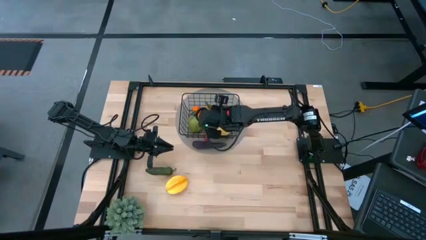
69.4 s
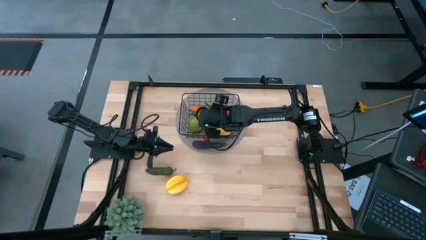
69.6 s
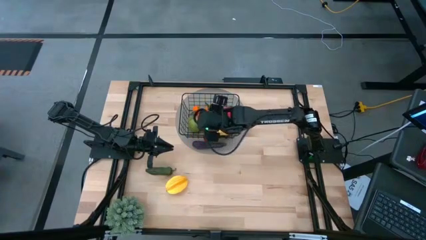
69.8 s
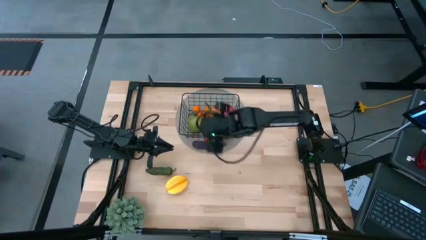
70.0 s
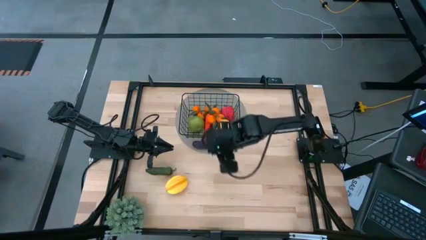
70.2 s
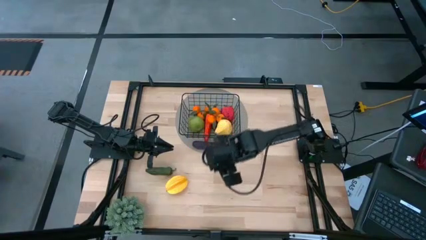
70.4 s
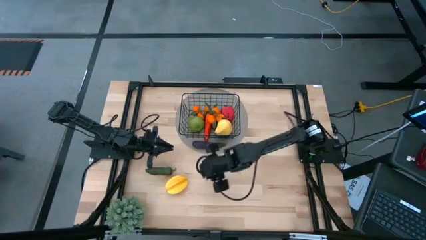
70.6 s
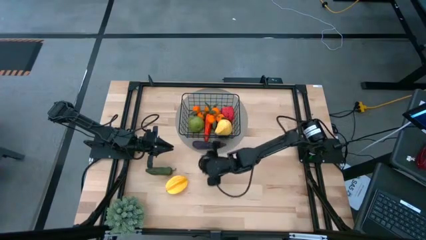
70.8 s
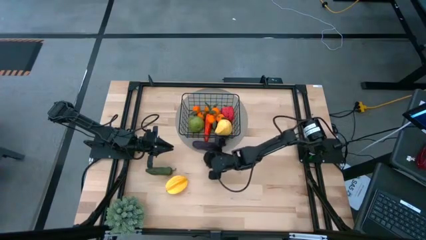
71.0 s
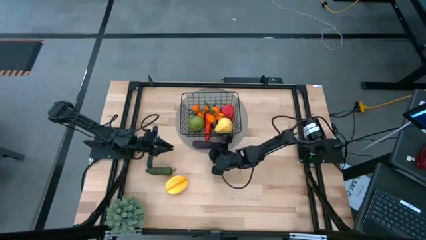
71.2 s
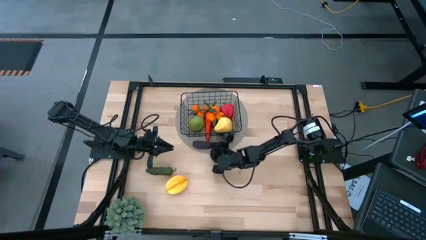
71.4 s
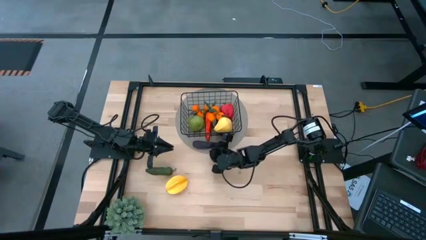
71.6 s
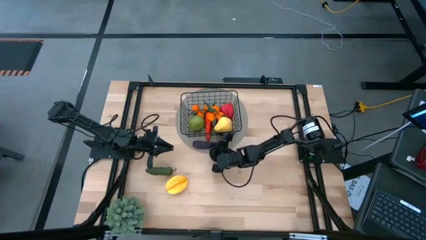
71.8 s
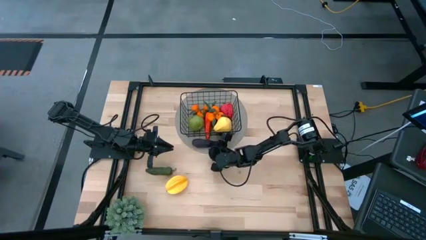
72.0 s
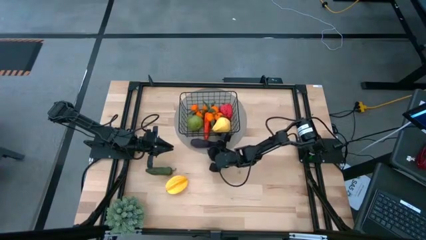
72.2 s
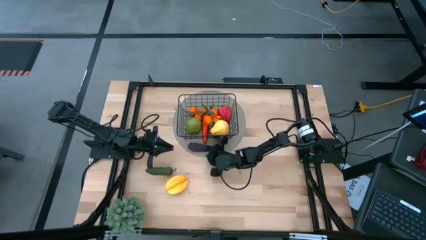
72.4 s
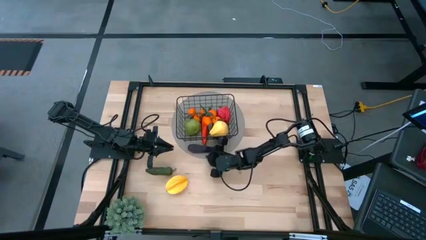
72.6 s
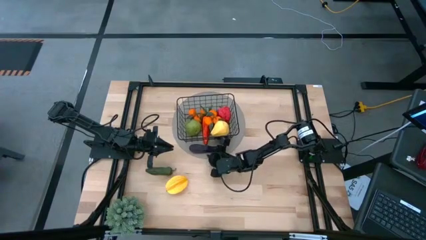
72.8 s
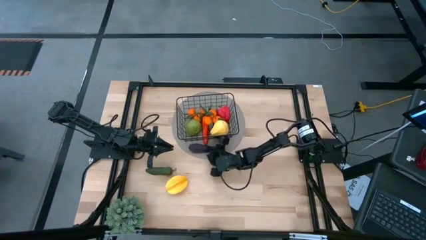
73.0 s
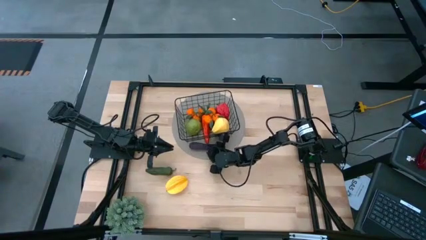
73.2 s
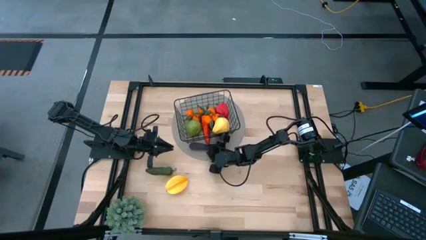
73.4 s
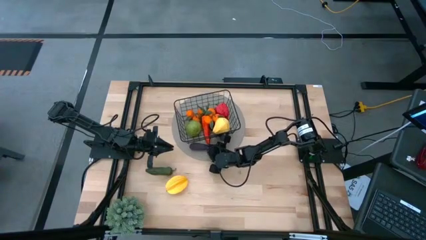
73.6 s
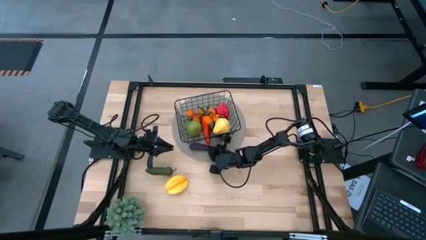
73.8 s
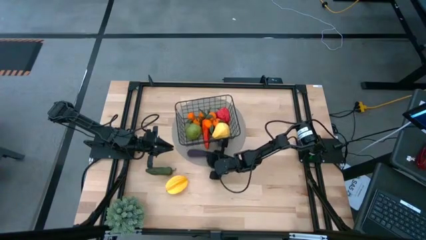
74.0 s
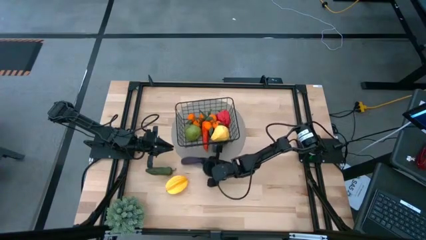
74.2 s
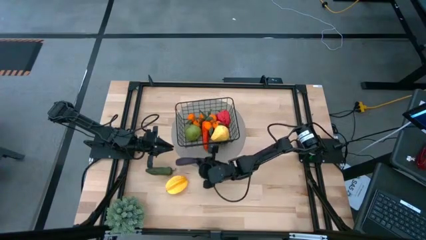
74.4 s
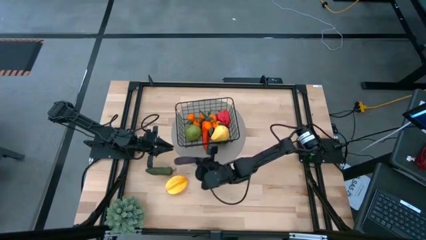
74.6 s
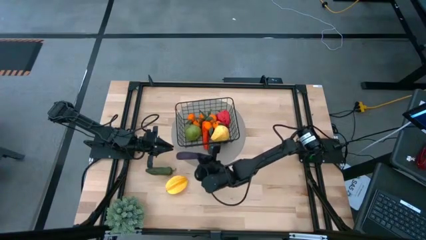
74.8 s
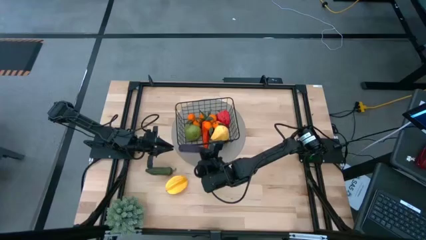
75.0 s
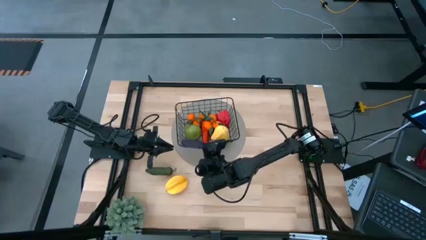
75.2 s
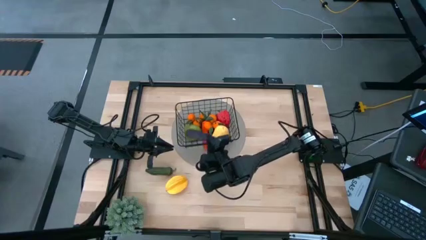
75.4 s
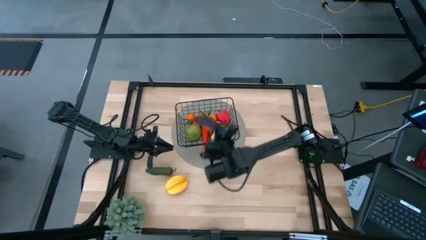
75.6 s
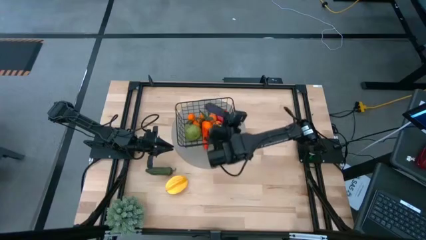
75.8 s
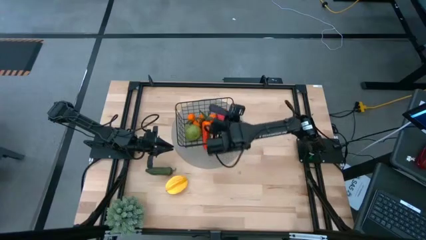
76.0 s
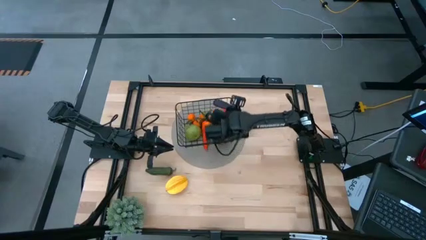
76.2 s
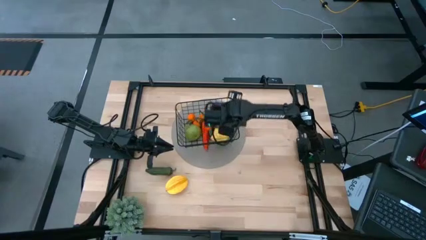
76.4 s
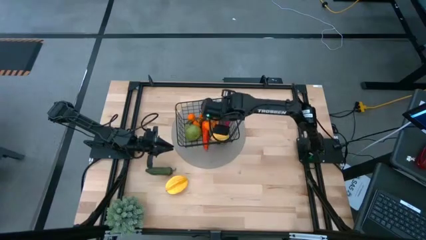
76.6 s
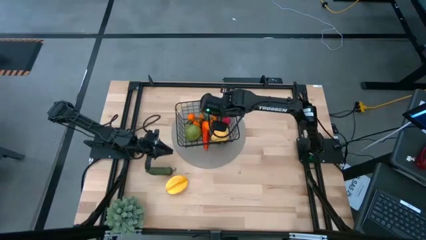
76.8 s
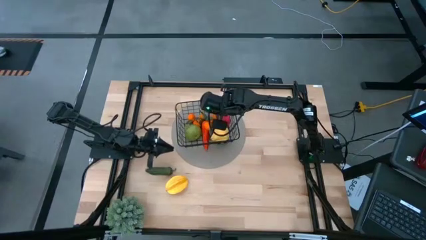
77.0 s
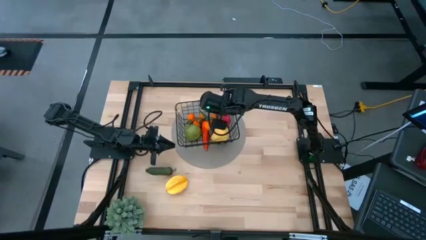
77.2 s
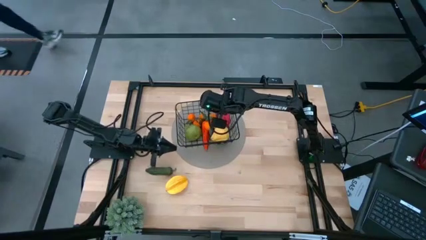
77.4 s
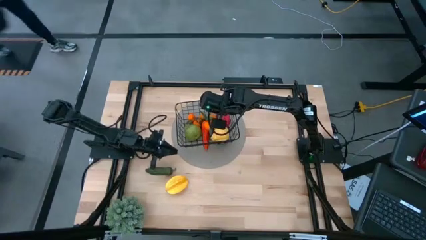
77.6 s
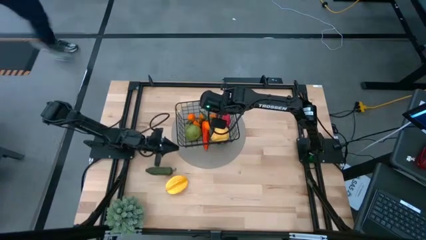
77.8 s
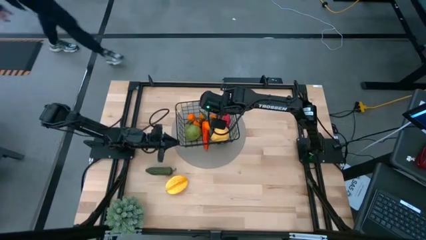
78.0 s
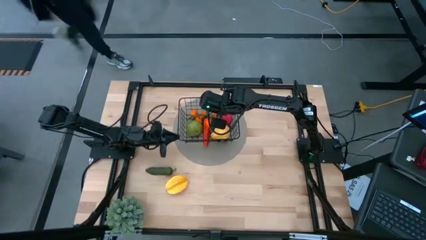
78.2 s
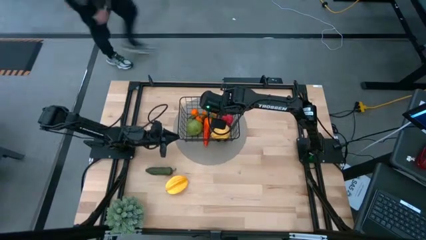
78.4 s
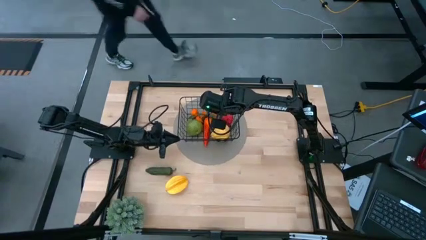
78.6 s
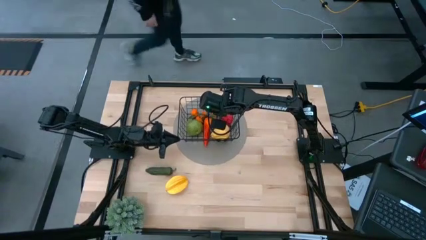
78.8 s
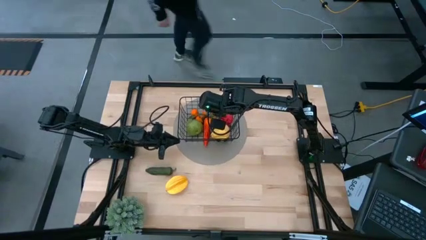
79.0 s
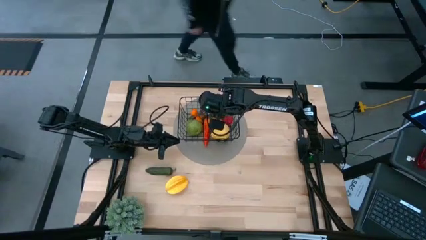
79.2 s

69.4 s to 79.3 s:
Task: Build produce basket
Put the eggplant into the wire organizer

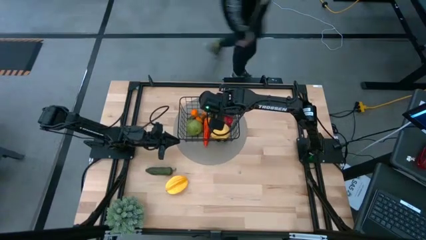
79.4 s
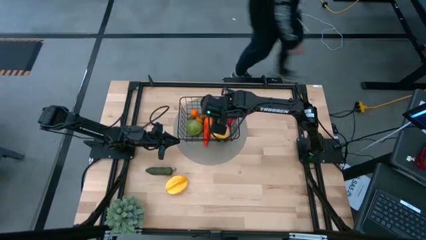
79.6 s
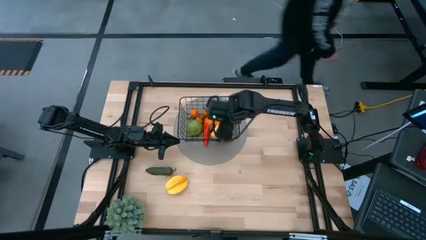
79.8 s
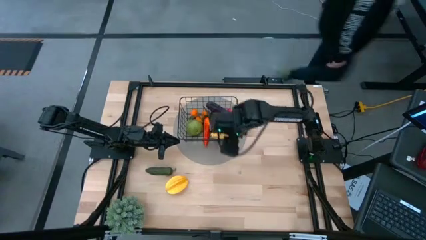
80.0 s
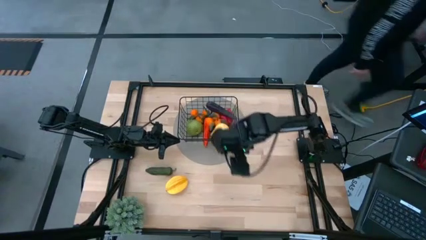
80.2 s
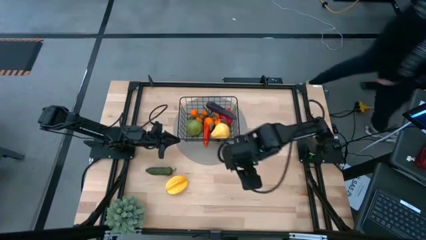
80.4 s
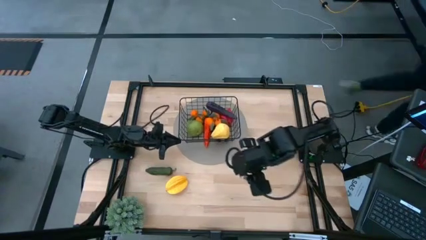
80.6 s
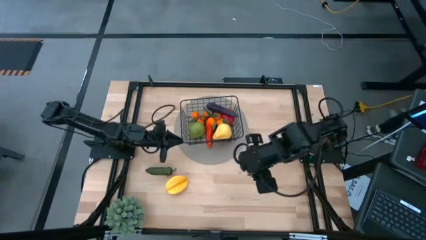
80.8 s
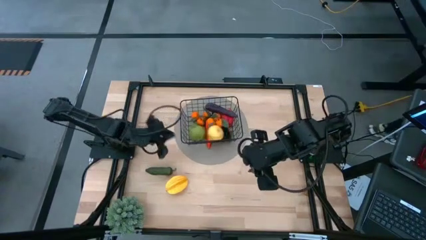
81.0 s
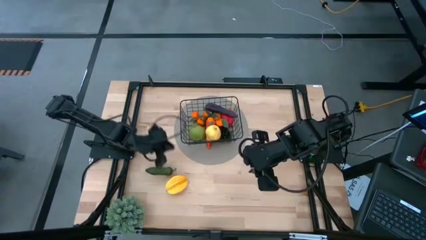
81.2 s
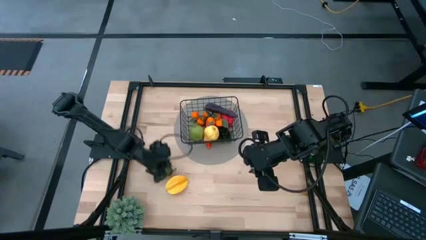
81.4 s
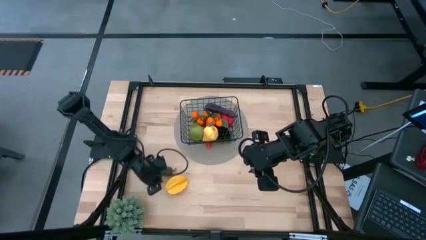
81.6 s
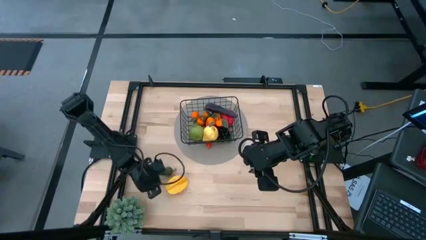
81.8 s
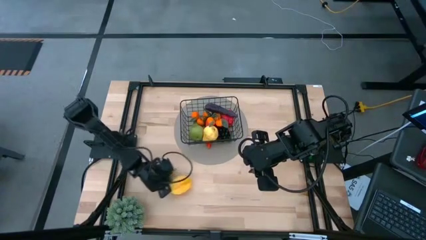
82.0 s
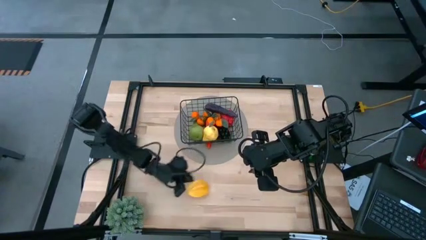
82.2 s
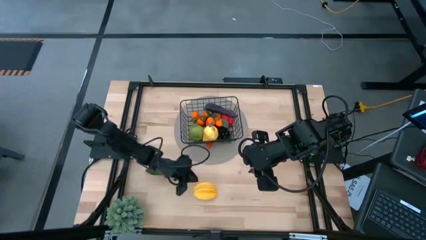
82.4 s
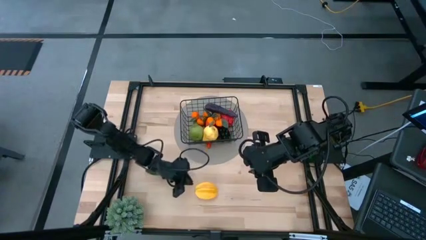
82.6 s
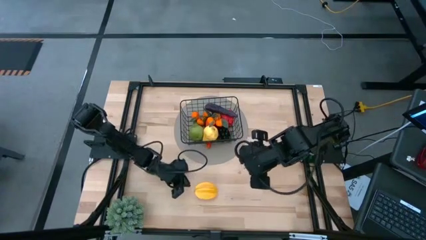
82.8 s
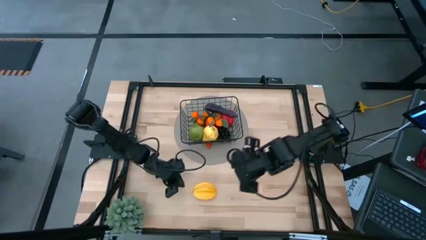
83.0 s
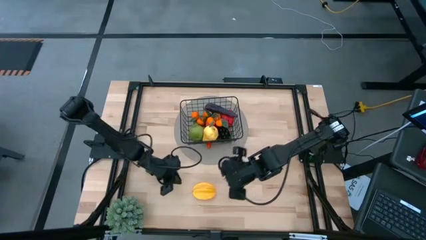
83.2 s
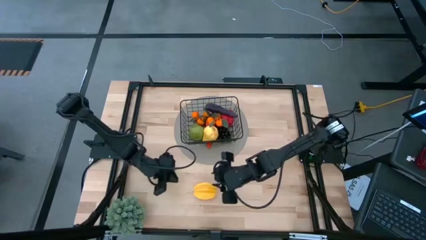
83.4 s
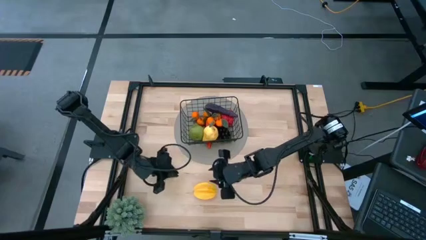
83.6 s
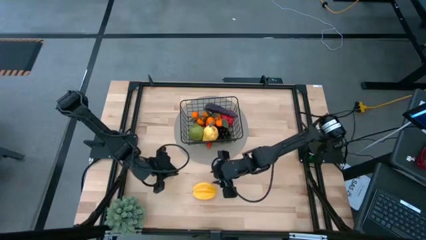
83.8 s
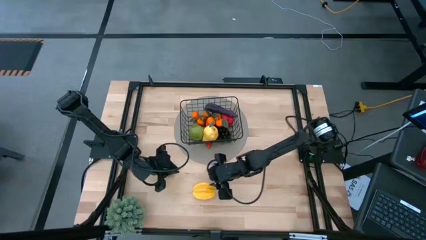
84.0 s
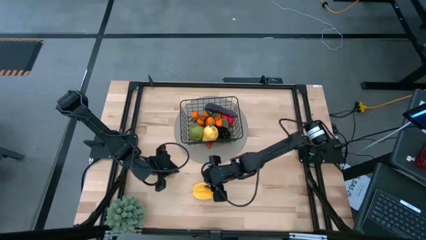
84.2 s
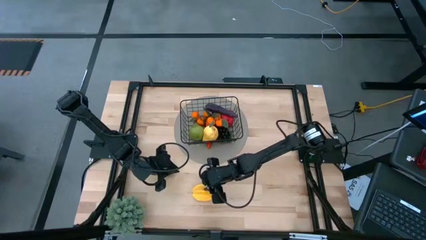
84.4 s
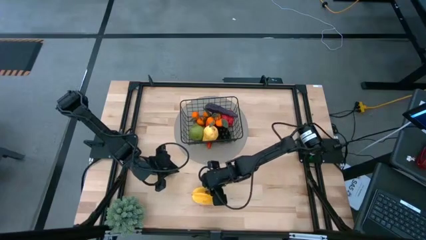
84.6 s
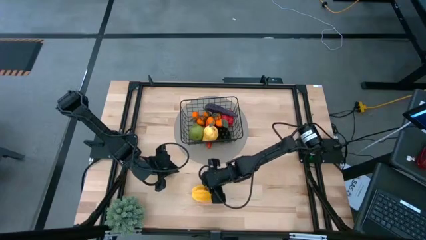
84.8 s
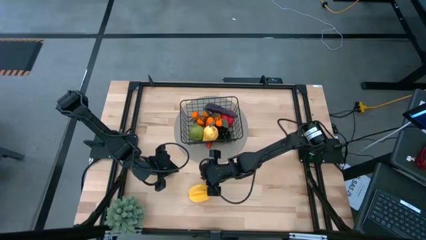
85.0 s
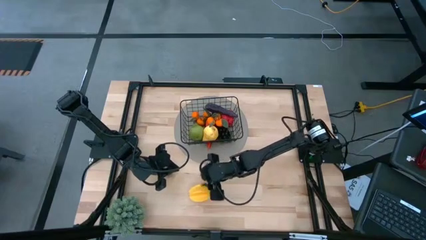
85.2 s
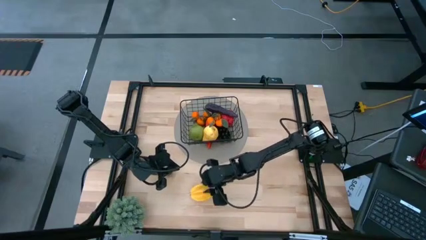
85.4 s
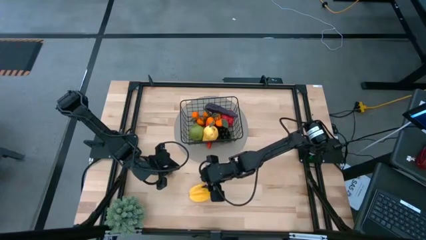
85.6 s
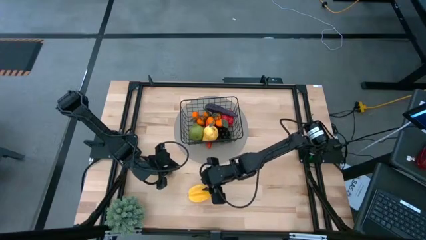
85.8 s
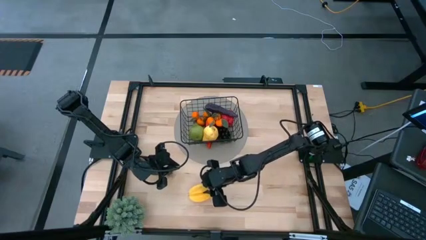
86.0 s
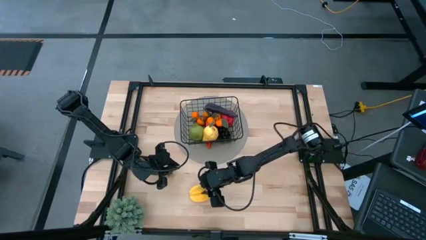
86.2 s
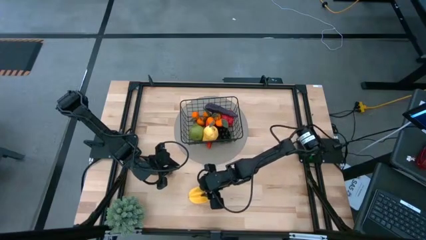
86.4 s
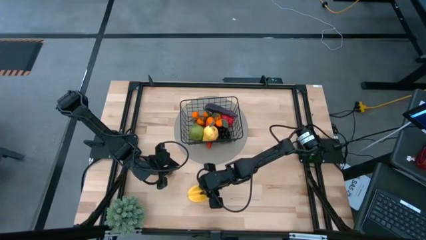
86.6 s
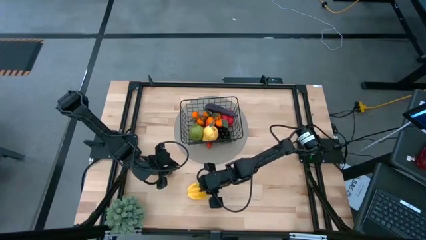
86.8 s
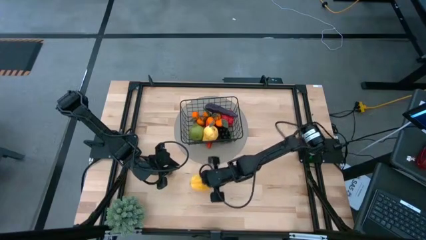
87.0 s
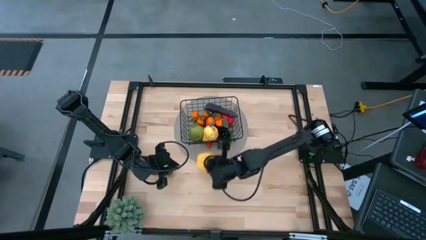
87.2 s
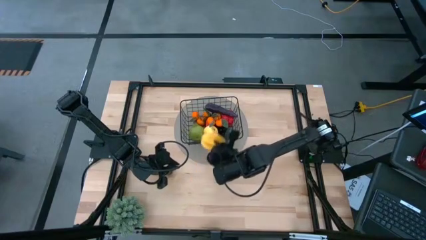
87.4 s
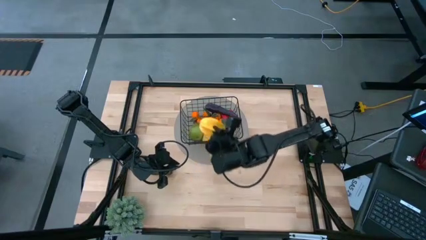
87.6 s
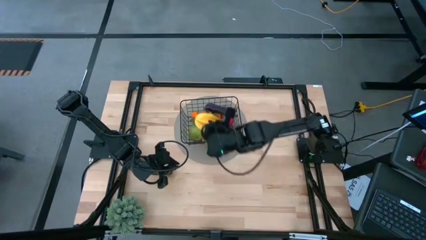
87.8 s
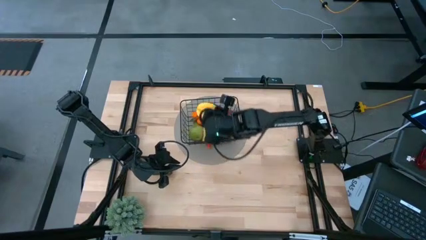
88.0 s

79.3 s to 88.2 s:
Put the starfruit into the wire organizer
